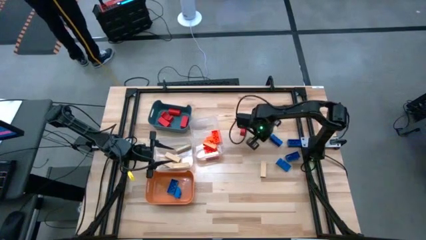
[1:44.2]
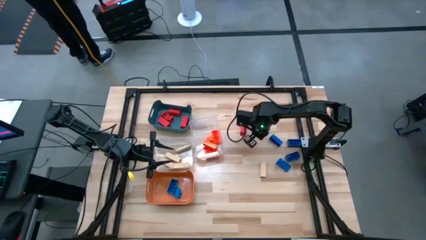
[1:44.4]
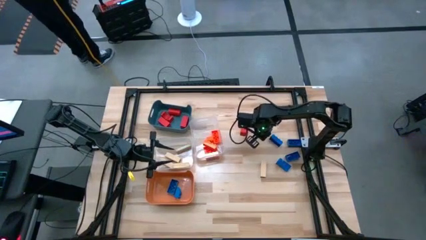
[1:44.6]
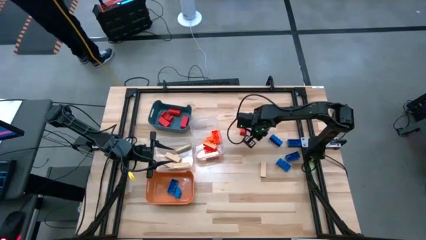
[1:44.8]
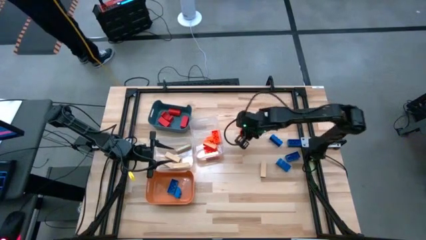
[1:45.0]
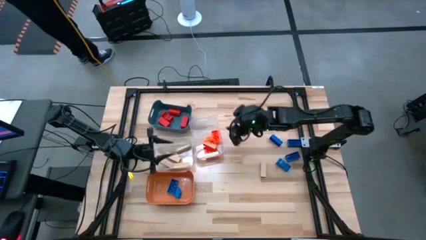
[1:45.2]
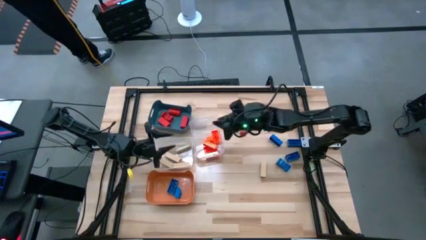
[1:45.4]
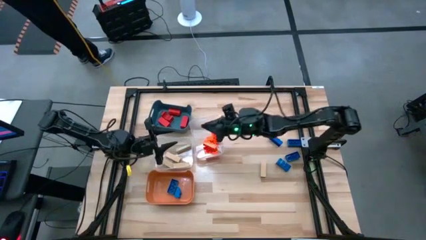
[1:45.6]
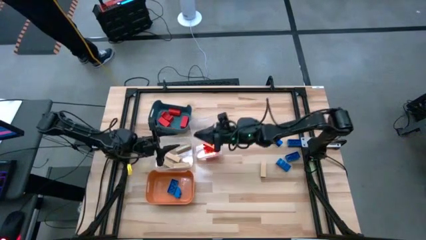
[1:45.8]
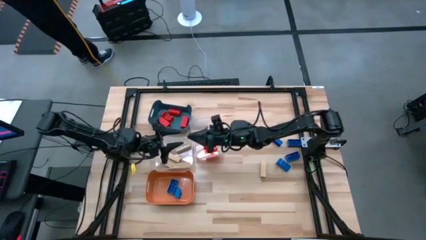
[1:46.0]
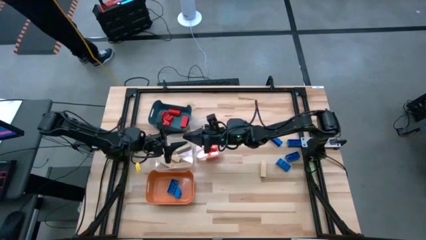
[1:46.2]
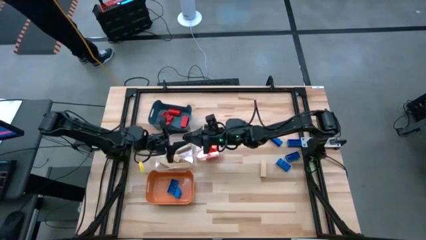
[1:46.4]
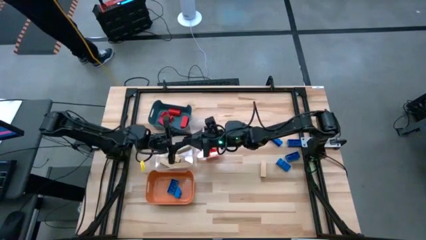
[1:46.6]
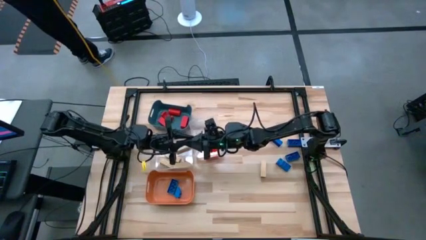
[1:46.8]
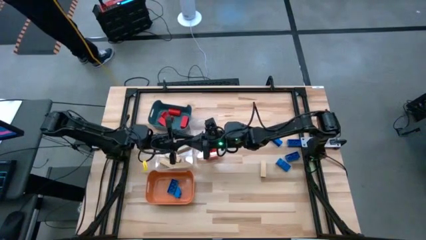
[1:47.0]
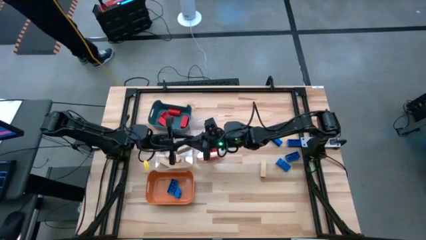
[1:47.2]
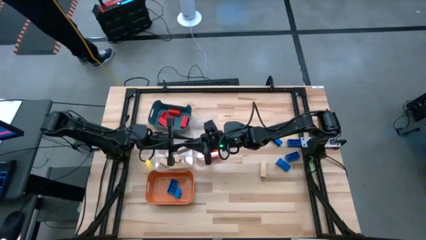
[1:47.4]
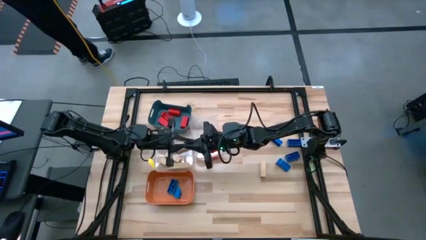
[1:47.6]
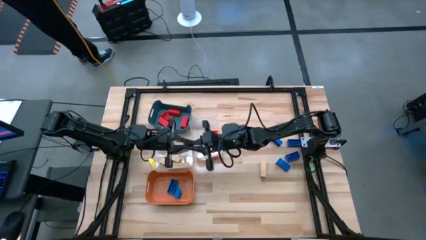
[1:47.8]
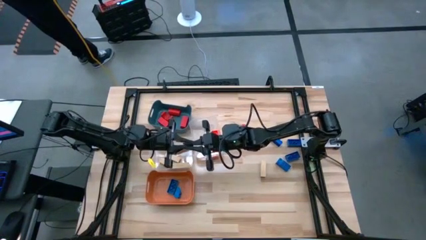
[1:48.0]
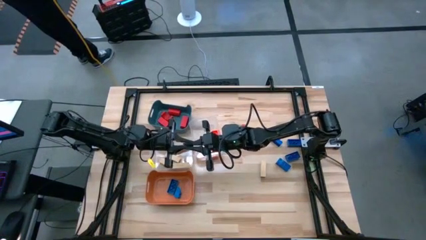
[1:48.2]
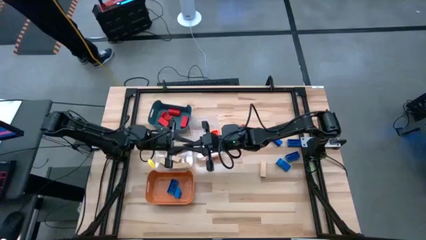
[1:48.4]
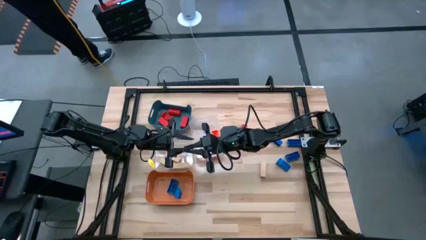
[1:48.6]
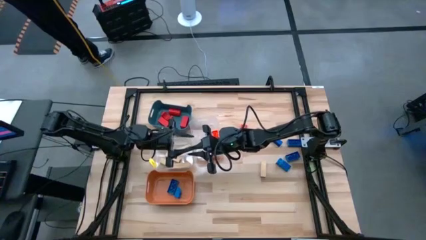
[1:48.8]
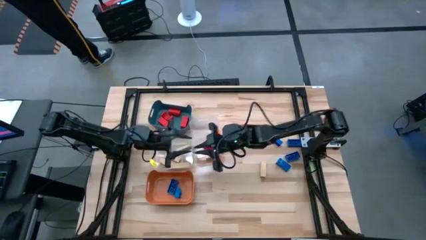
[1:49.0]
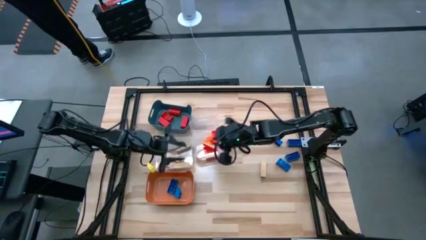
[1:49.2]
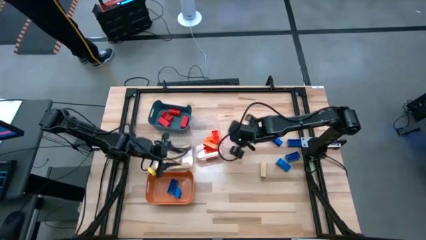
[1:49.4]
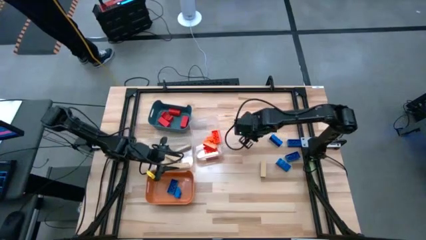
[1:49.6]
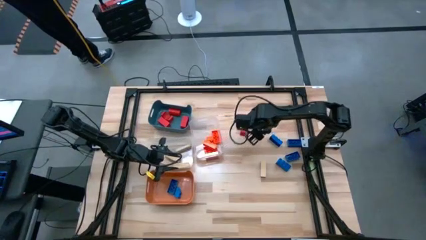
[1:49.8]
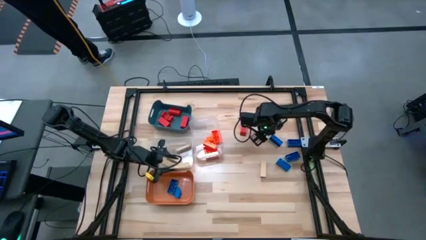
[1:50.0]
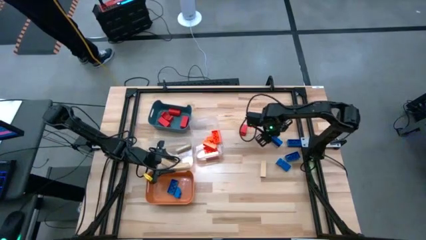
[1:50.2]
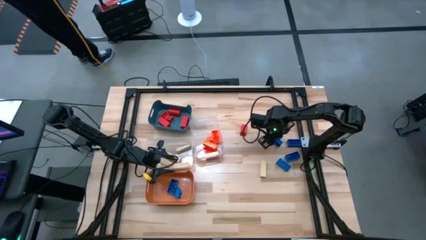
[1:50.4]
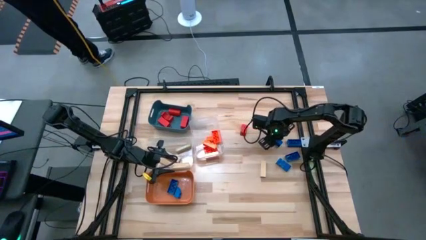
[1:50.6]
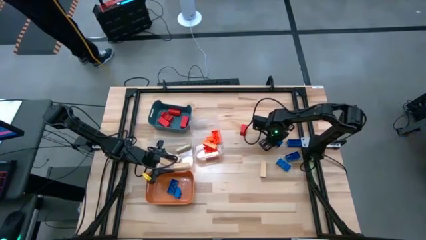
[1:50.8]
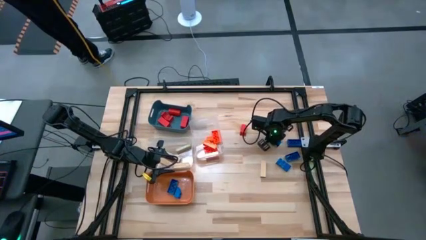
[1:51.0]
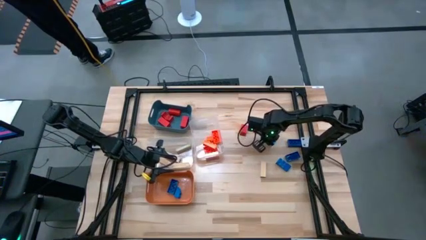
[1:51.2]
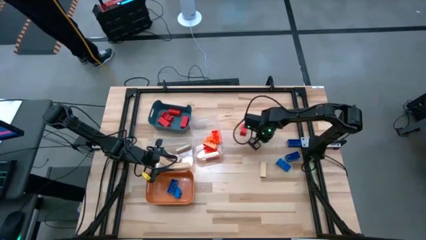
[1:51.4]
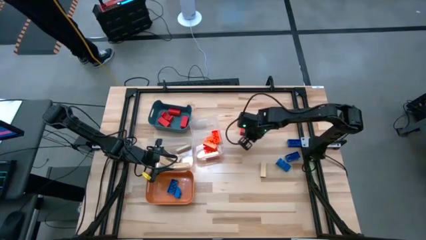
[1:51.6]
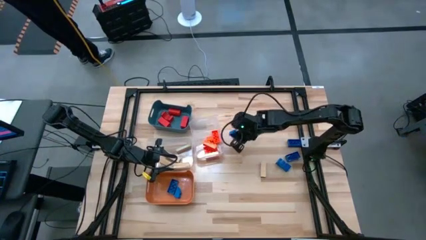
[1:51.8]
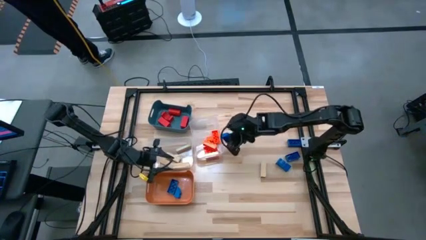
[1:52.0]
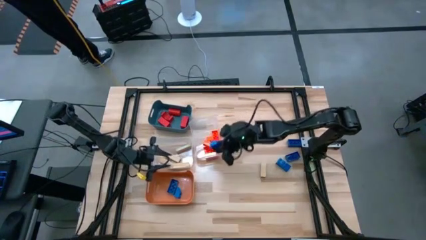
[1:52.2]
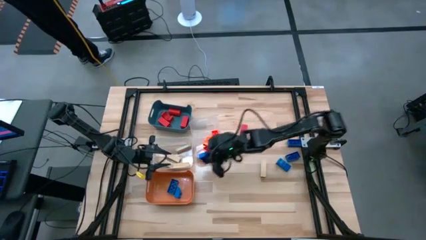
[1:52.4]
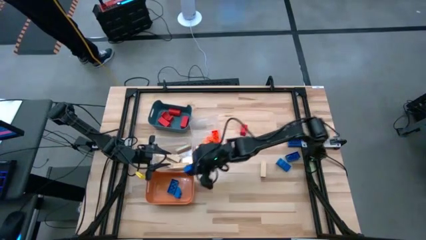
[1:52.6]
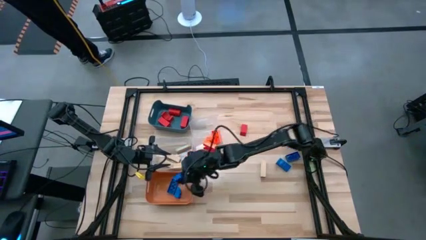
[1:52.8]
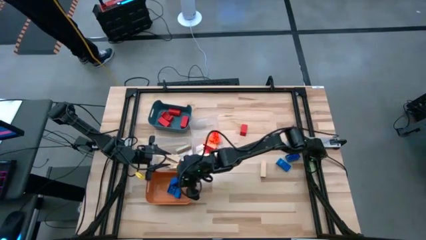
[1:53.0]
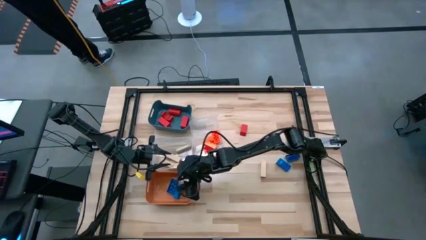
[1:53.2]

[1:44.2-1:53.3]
Task: Sort blocks
Put the blue game piece into the orange bin

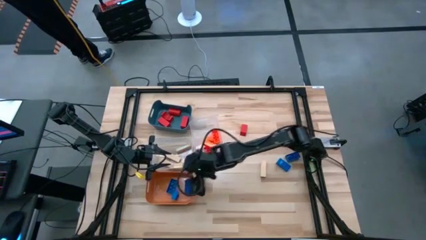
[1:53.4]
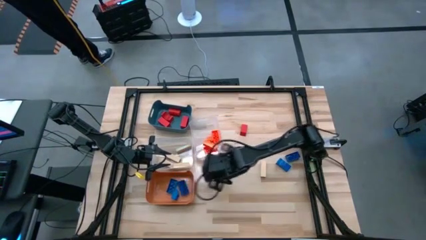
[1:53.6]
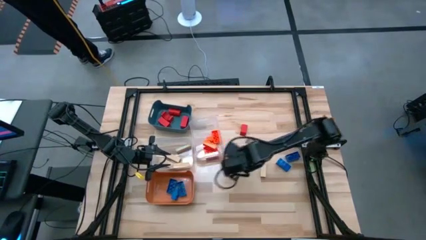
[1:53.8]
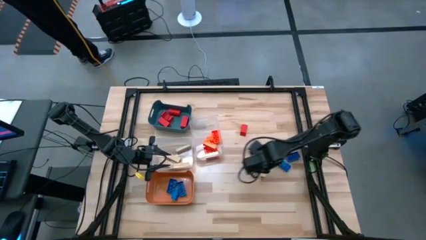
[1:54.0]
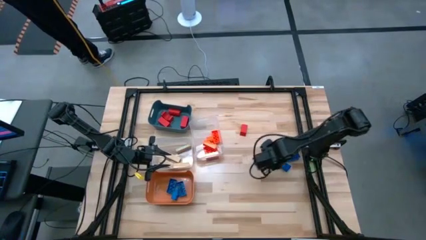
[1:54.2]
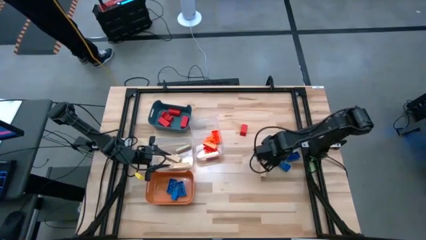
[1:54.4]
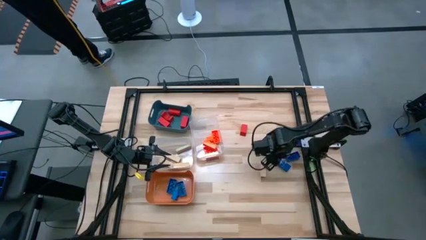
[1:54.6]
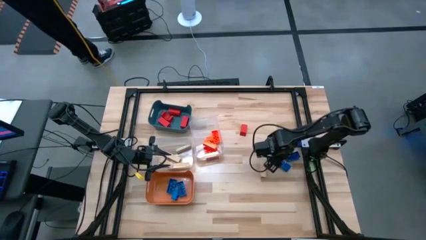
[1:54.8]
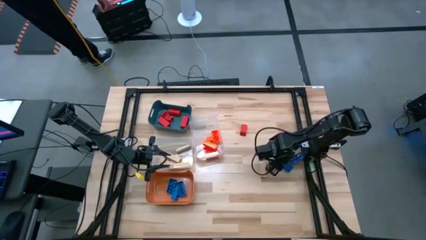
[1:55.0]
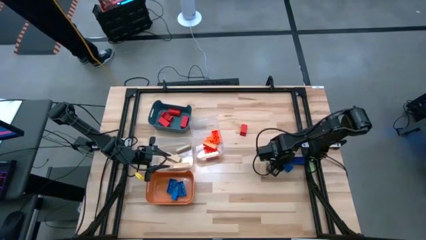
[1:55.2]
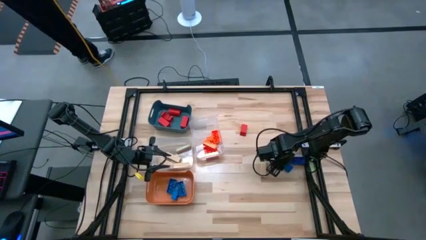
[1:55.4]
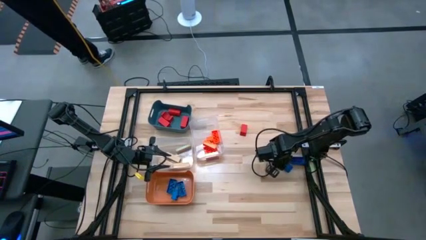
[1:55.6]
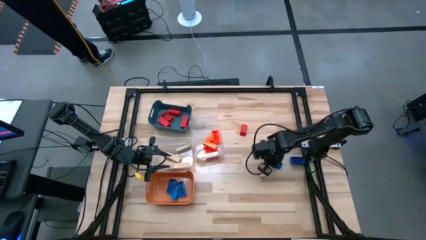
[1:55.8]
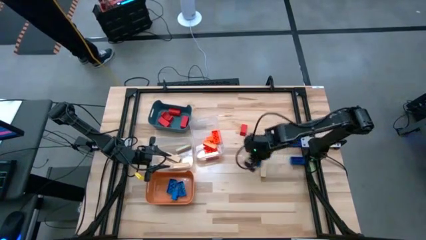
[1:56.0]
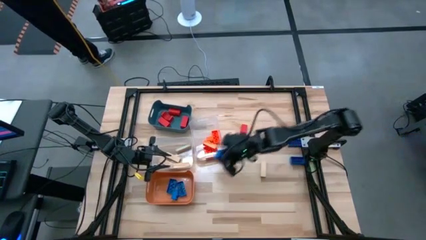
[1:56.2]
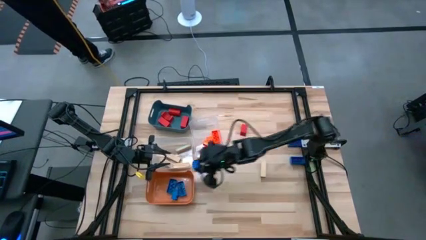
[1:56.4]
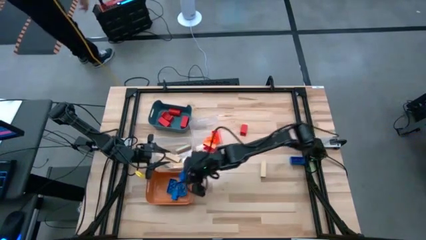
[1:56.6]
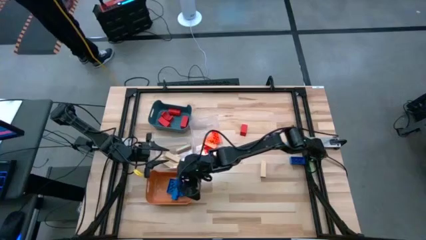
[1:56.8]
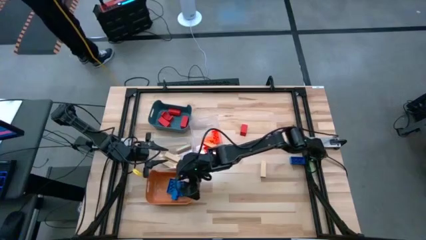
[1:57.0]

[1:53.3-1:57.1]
Put the blue game piece into the orange bin

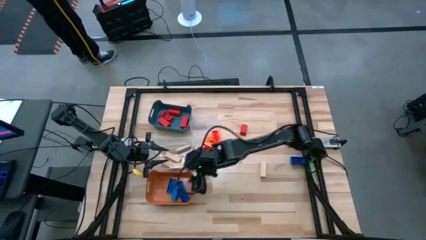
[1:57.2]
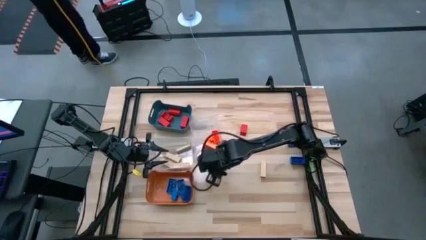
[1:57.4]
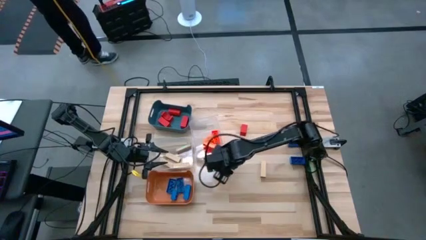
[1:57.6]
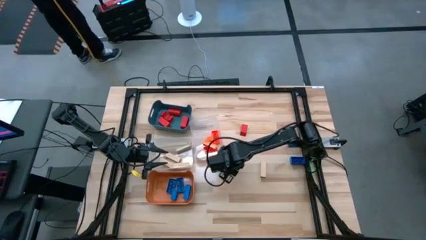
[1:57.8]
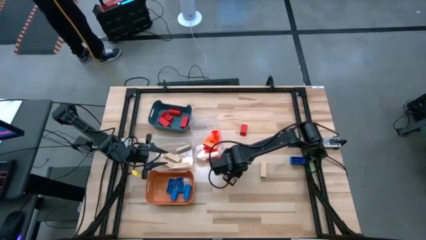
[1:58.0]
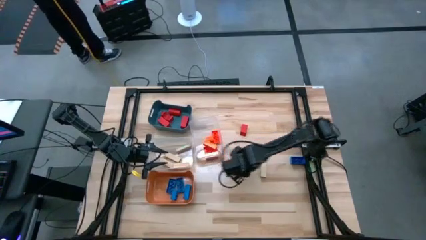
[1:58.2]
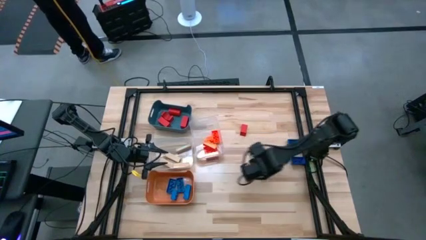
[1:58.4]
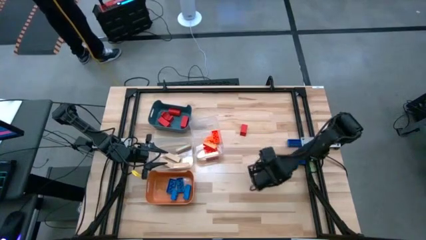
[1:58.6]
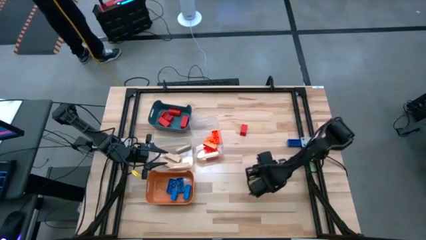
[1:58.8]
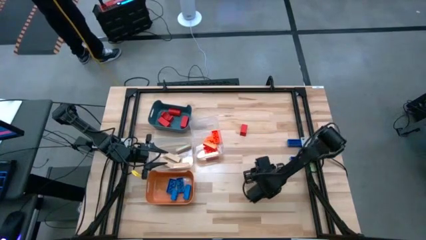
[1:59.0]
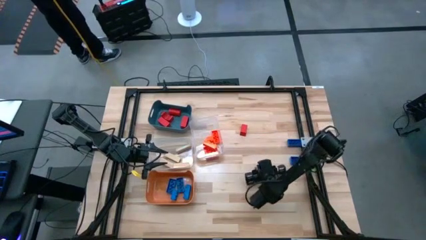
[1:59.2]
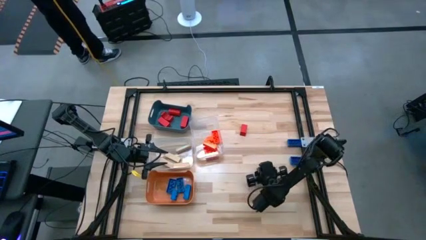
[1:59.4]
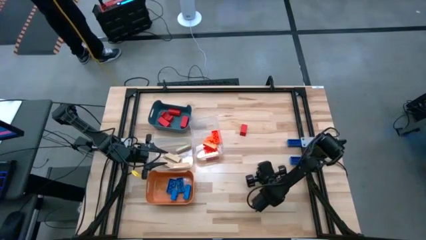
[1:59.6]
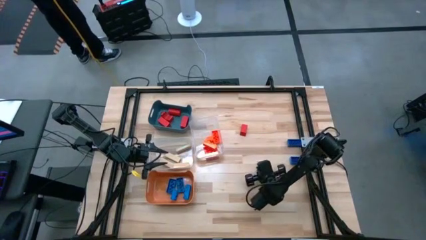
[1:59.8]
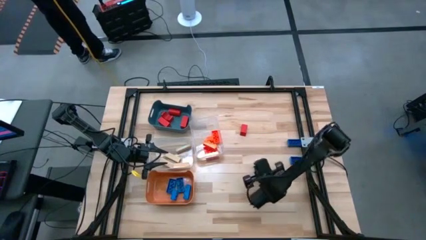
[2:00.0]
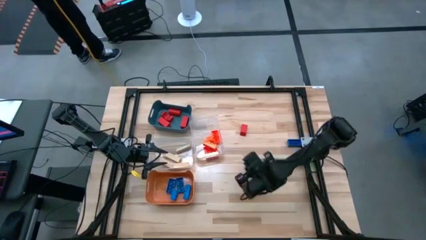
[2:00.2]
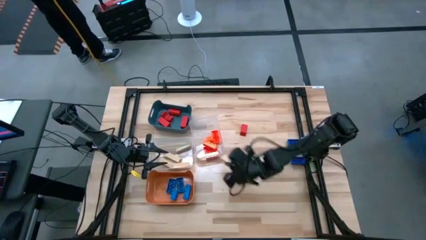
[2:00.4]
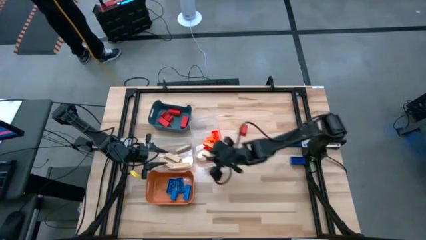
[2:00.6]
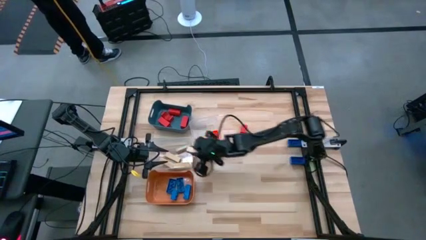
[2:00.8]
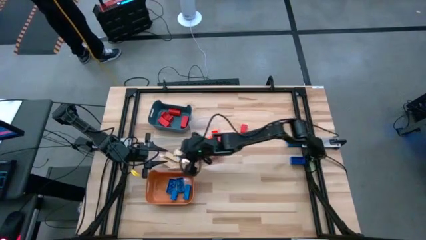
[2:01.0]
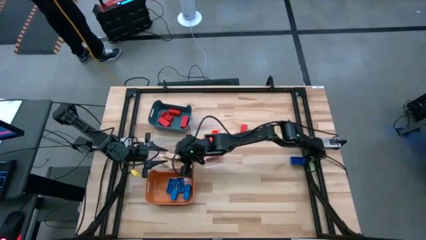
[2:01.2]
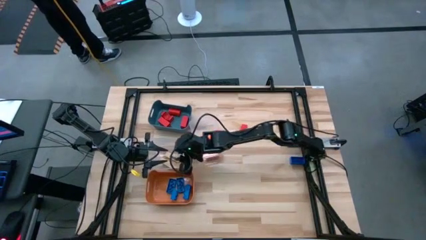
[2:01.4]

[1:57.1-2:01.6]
Put the brown block into the left transparent bin
